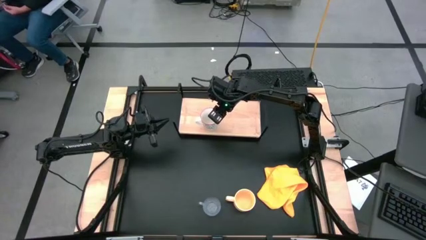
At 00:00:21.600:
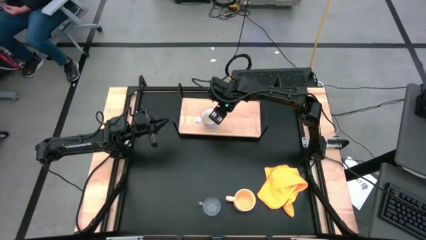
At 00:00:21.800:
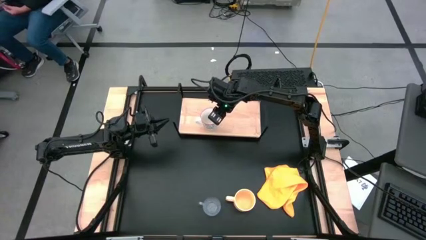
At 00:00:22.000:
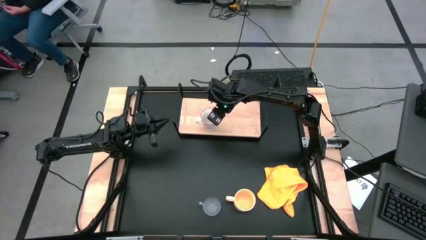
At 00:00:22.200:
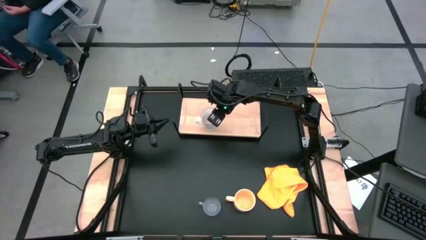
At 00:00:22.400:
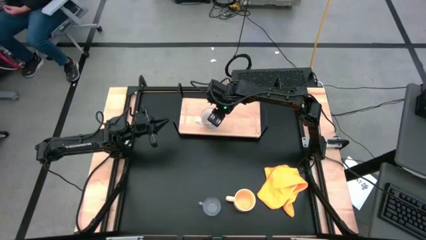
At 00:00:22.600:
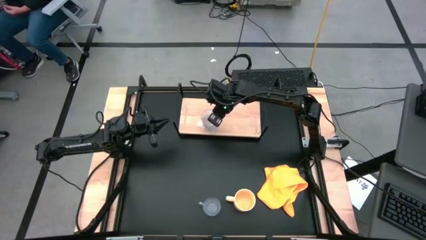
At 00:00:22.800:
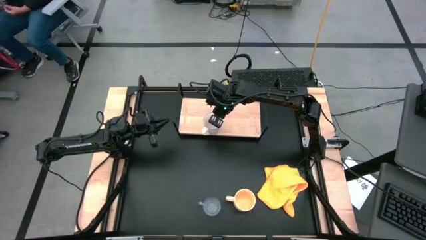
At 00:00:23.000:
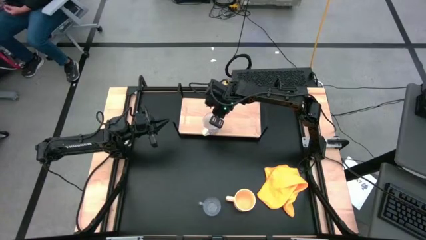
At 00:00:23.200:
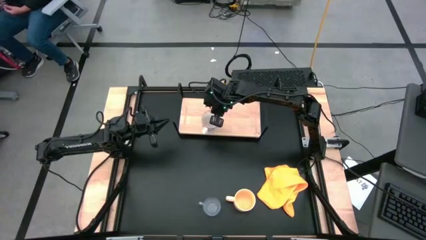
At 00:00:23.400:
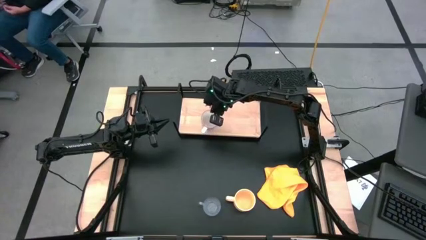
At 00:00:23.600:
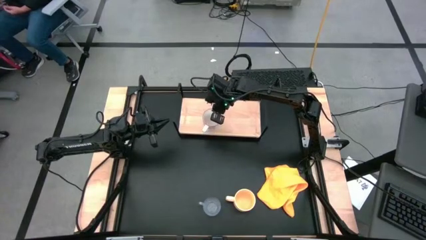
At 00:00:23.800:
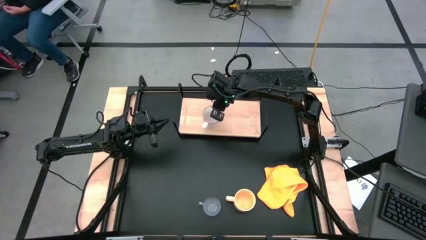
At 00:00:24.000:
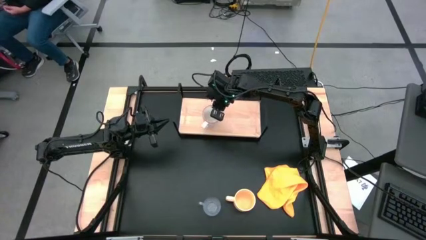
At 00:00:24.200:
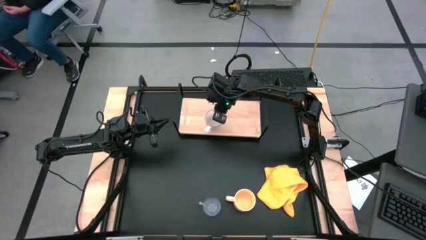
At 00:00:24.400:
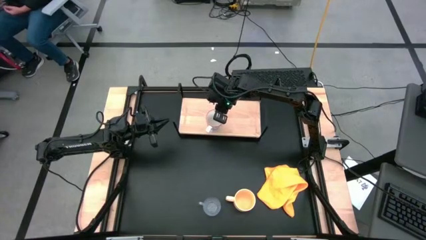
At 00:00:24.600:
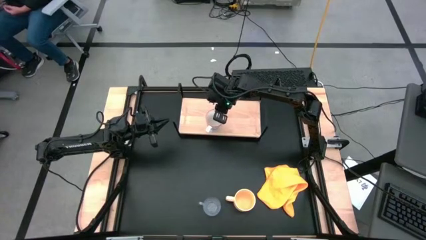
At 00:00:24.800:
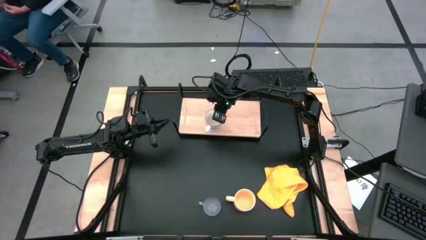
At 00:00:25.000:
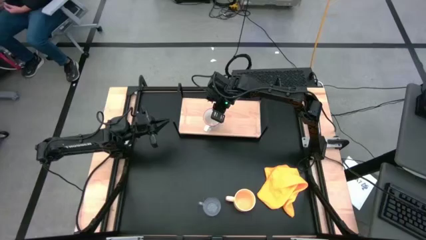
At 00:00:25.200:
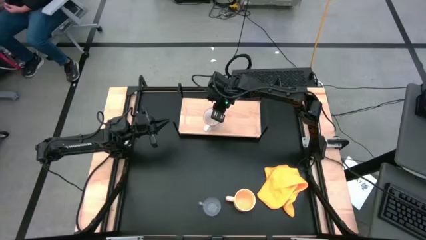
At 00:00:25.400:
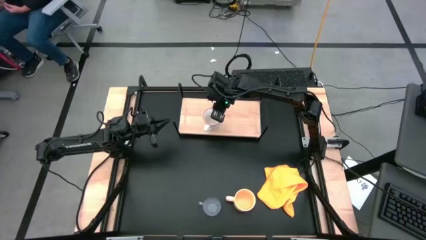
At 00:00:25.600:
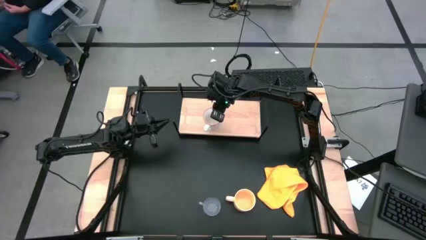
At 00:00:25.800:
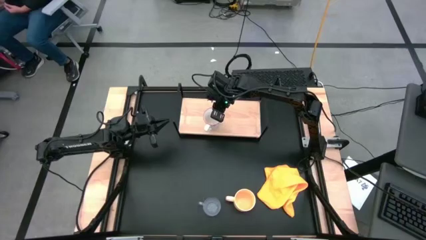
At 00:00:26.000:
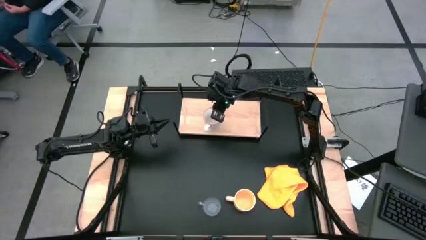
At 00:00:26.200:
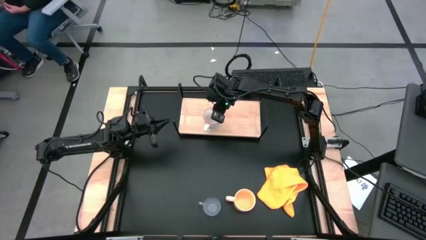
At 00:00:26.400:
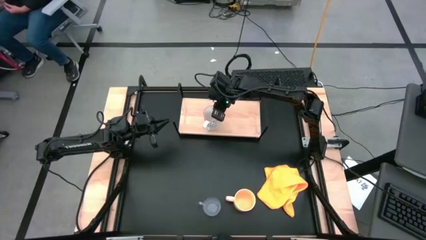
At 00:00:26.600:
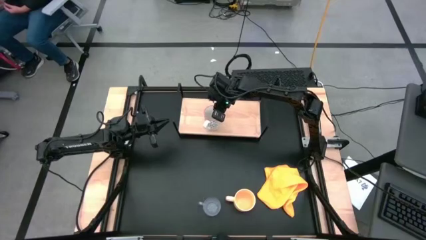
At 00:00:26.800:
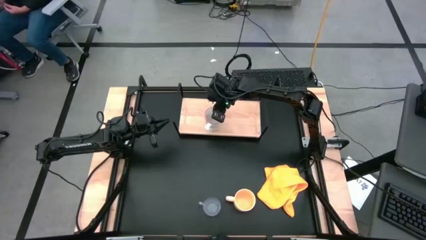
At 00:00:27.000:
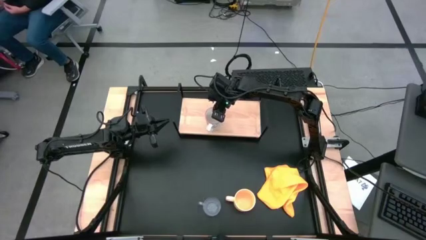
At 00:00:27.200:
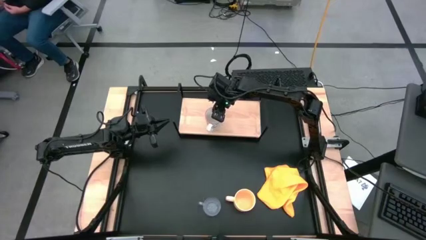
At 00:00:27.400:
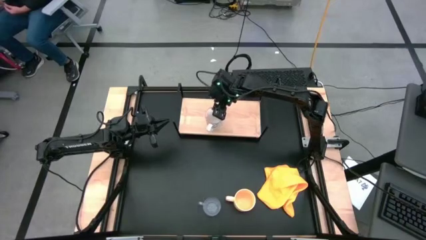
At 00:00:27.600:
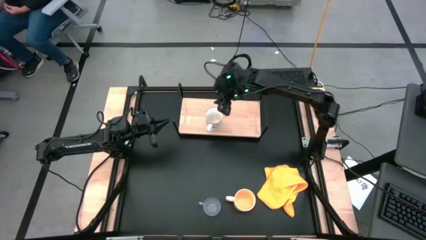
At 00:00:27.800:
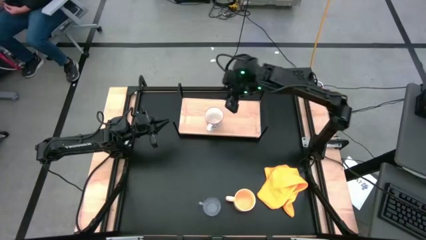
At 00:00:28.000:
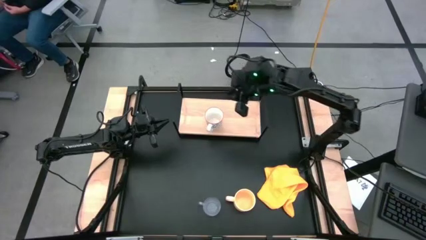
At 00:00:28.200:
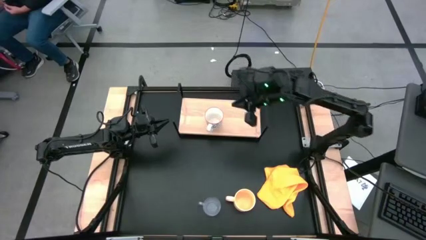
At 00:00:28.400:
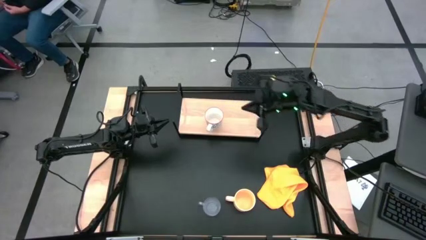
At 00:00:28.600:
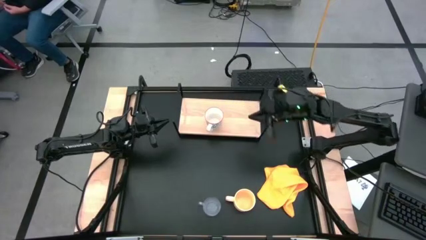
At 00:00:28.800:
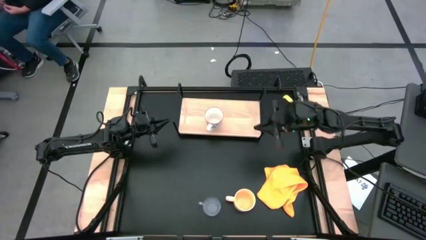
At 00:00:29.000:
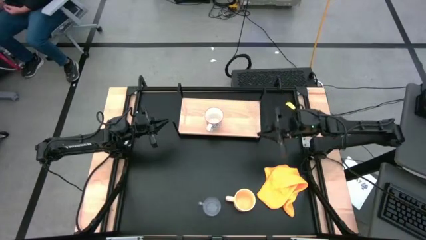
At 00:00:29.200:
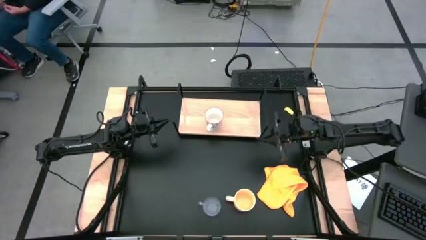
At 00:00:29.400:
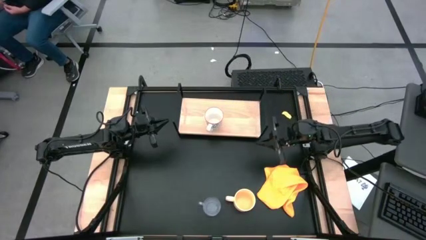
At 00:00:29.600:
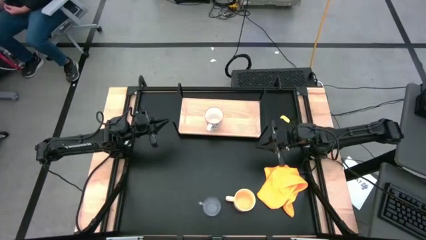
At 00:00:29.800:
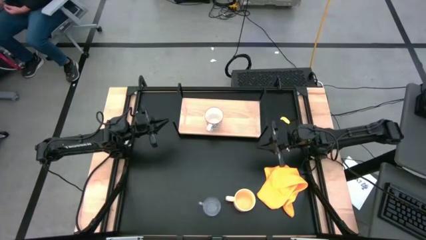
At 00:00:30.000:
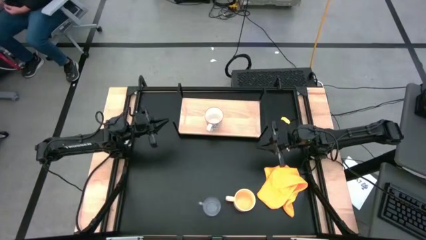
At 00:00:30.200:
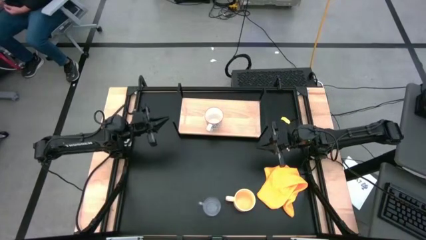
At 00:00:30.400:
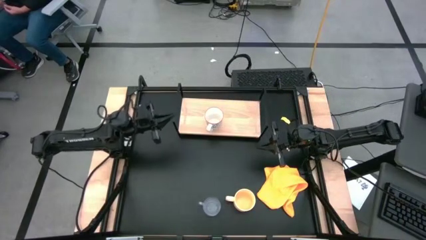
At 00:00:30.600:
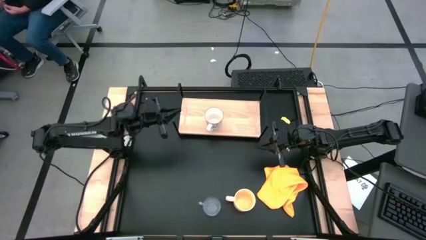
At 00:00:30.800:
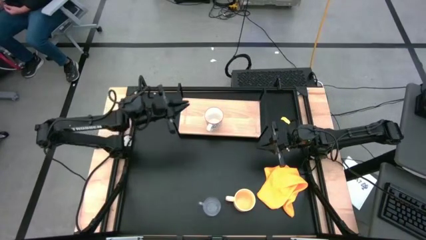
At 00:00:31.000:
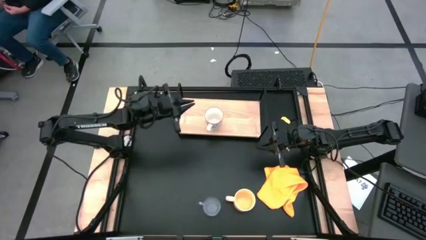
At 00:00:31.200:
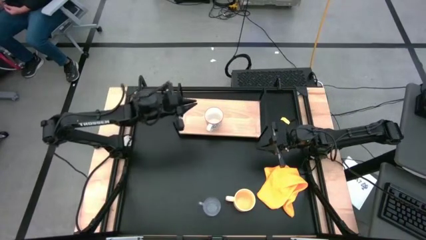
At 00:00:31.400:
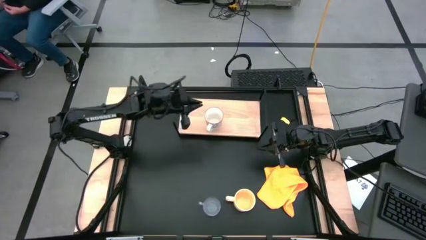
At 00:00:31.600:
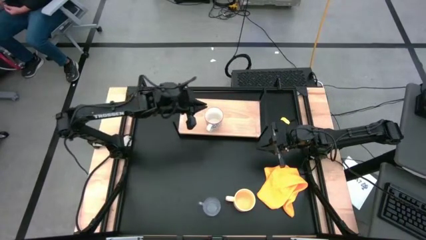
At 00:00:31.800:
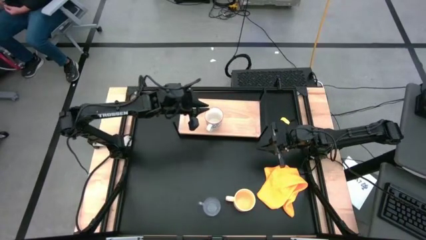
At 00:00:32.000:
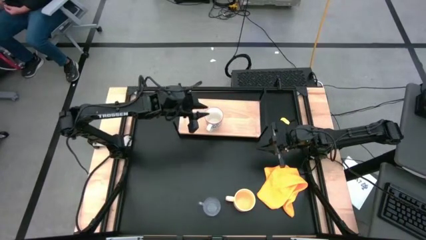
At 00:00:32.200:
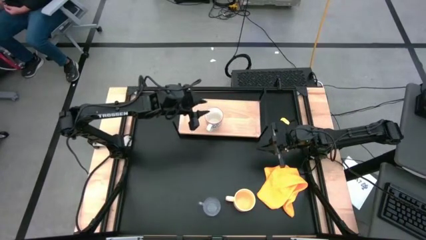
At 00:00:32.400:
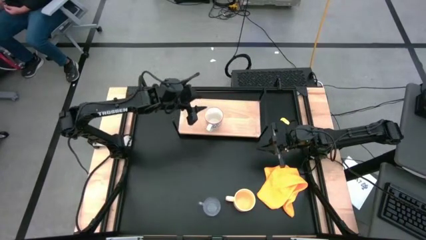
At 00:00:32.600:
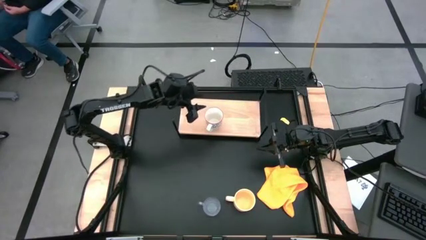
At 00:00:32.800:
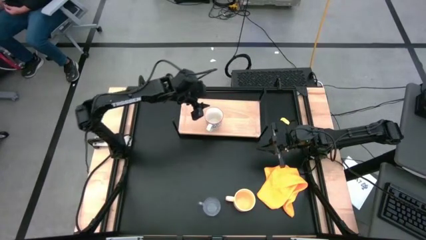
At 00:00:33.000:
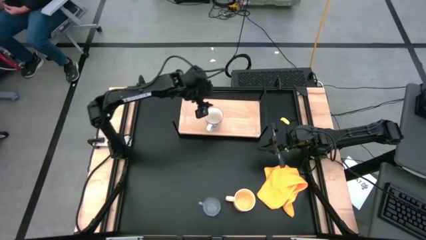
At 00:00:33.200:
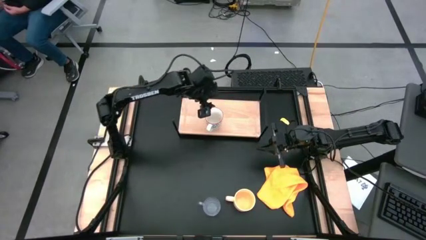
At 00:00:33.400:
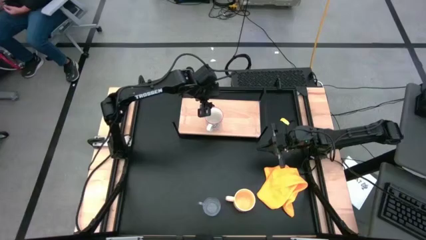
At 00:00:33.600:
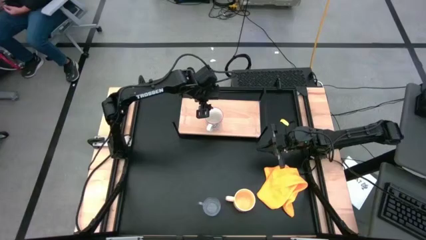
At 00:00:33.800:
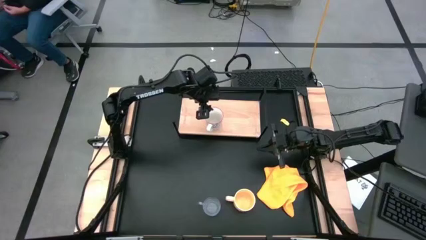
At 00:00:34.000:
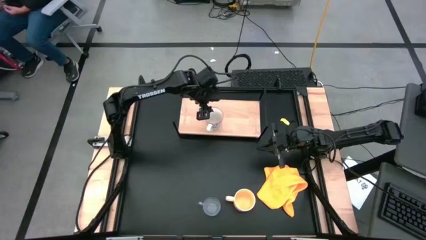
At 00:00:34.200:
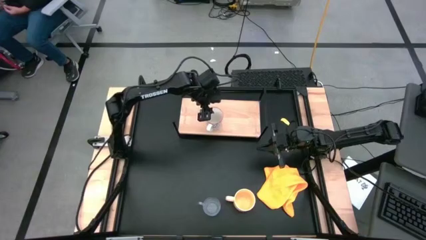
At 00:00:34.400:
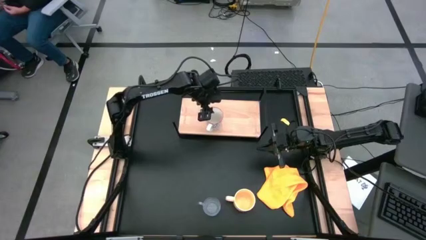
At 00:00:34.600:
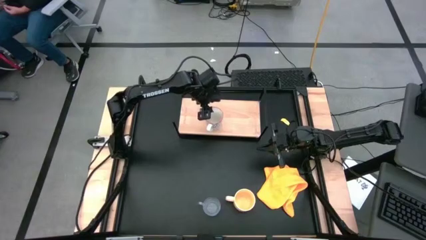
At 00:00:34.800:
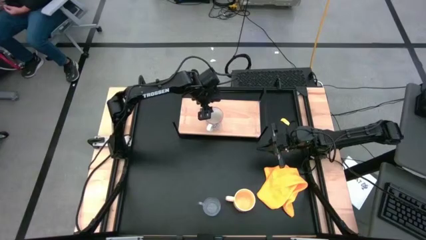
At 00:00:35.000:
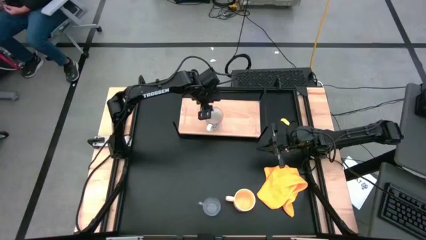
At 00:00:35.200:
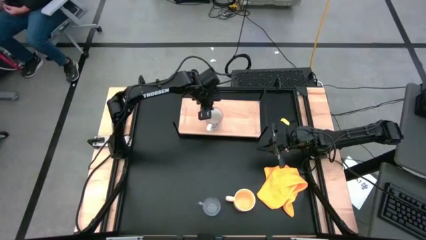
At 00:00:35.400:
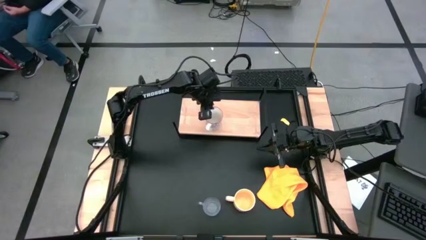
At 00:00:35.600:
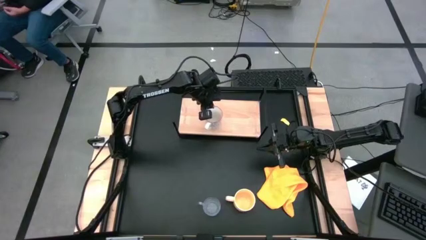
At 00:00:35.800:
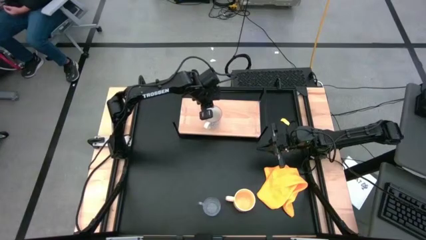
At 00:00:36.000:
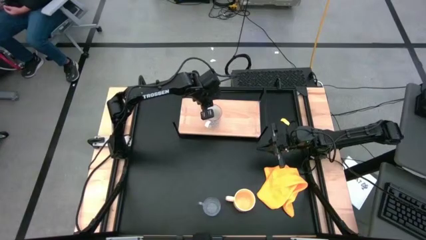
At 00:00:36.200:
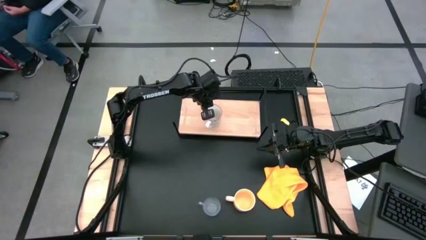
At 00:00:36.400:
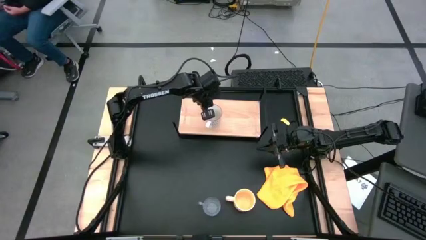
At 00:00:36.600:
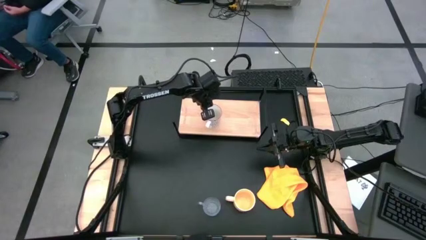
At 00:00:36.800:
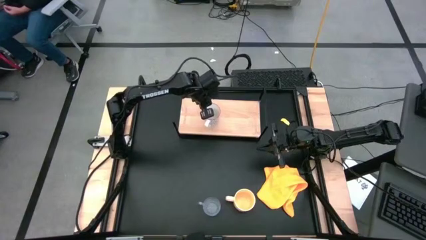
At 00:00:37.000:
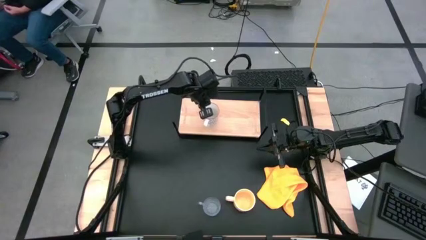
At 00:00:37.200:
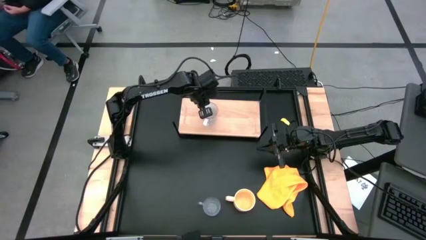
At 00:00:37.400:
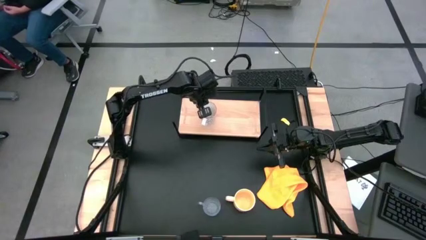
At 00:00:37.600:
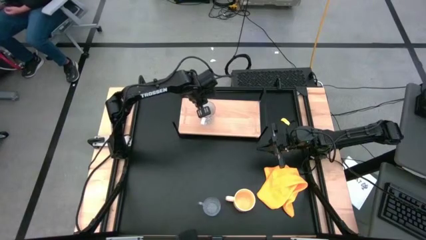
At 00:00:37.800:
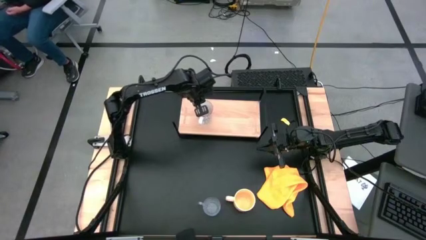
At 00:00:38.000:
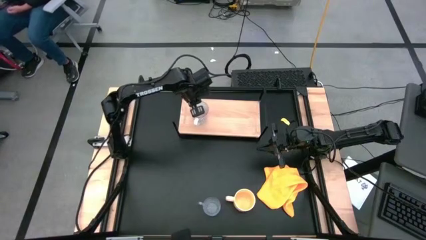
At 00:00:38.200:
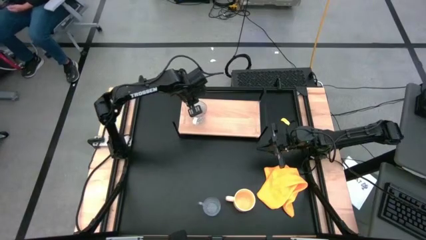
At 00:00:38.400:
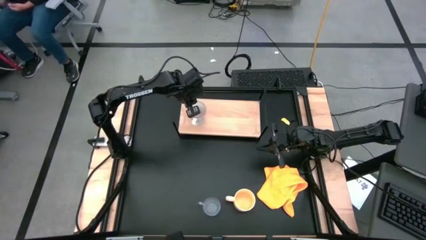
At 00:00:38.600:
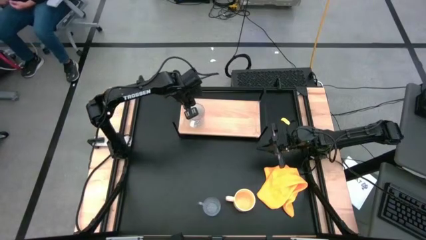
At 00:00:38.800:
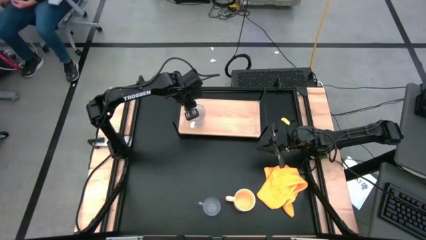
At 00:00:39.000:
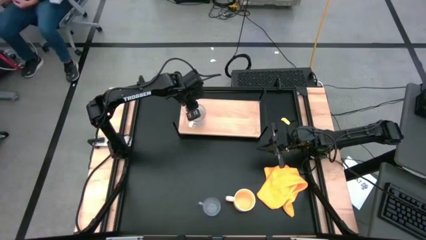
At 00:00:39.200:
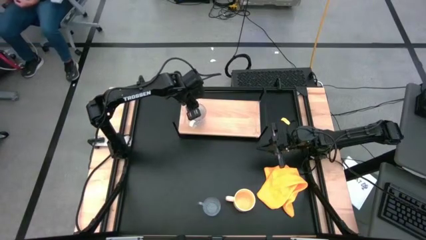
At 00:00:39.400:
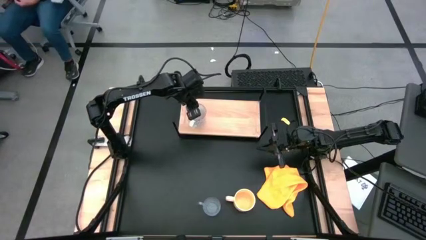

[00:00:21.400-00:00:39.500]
Task: Stack small to large cups/mugs on shelf
Put the gray patterned mug on the shelf
